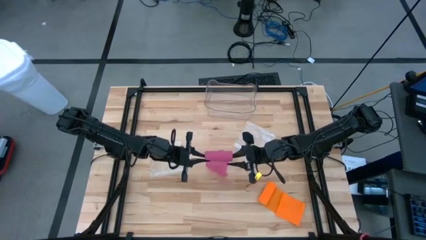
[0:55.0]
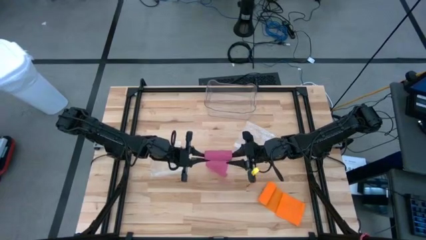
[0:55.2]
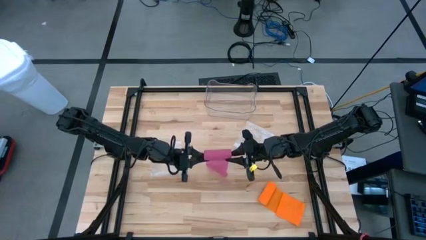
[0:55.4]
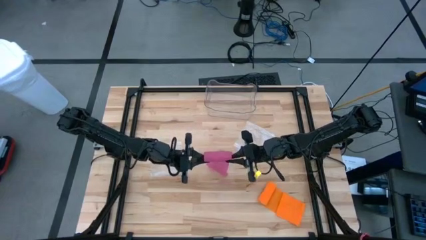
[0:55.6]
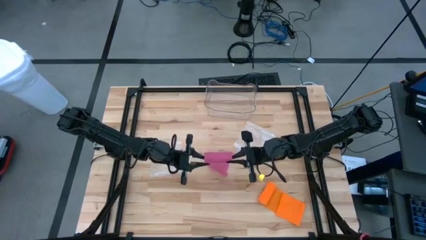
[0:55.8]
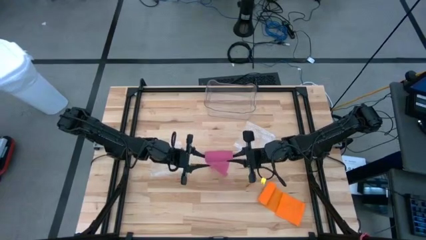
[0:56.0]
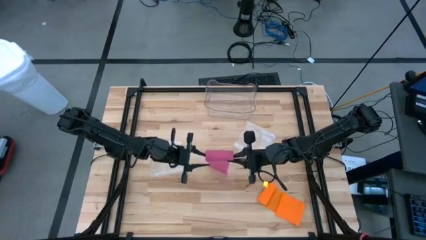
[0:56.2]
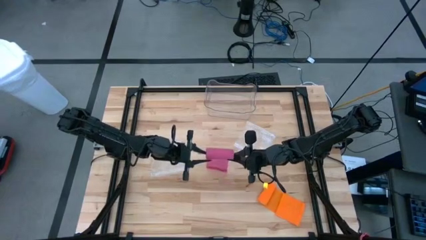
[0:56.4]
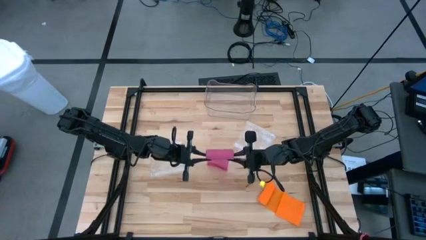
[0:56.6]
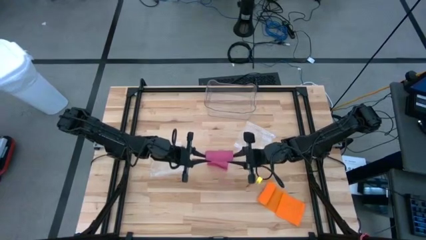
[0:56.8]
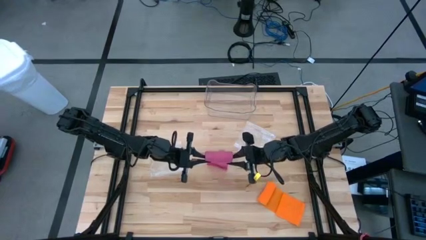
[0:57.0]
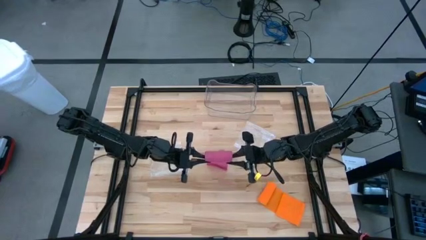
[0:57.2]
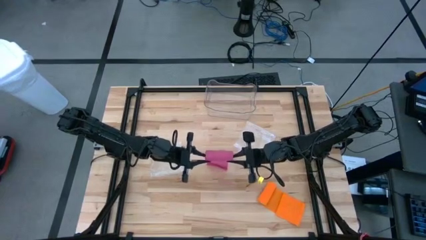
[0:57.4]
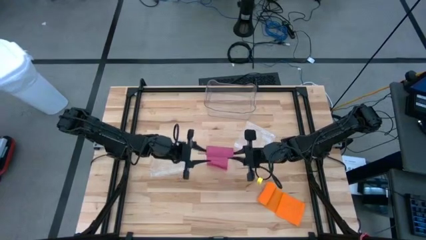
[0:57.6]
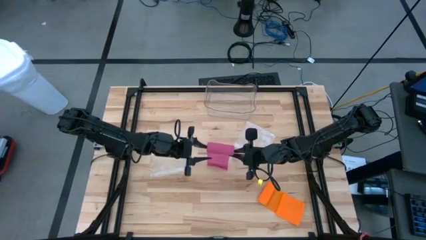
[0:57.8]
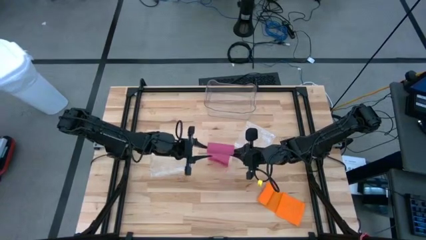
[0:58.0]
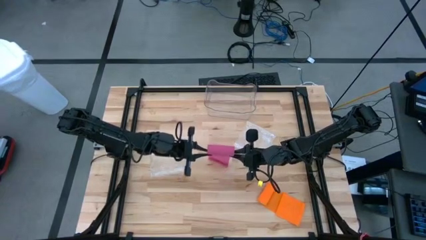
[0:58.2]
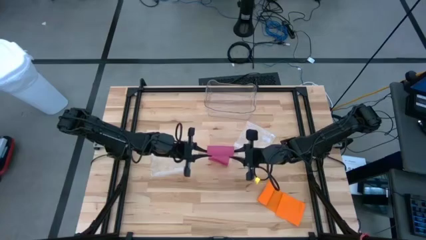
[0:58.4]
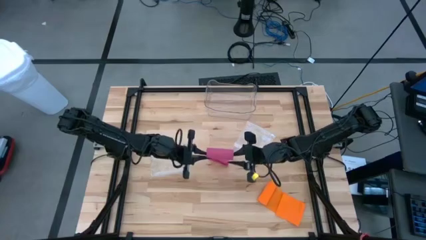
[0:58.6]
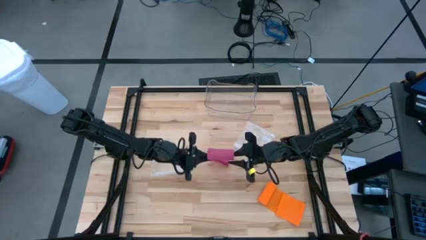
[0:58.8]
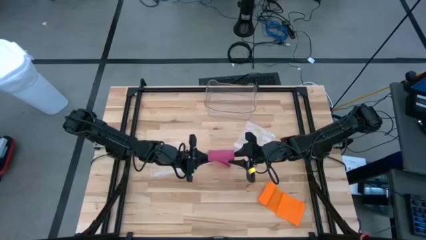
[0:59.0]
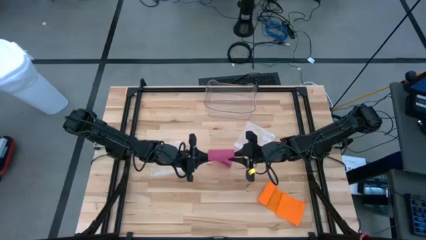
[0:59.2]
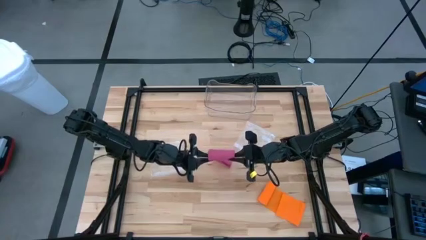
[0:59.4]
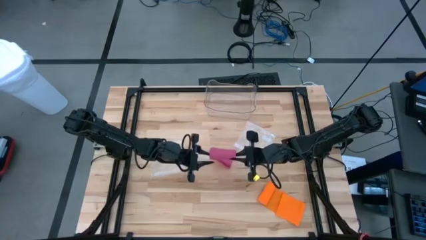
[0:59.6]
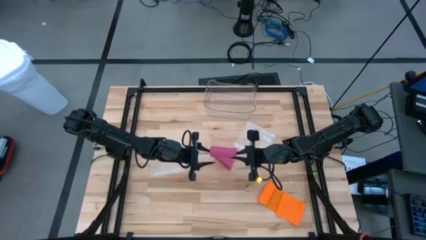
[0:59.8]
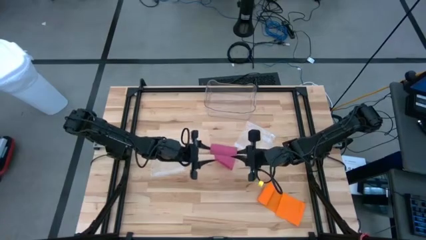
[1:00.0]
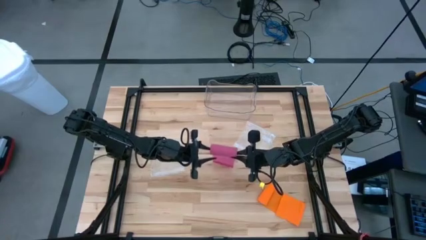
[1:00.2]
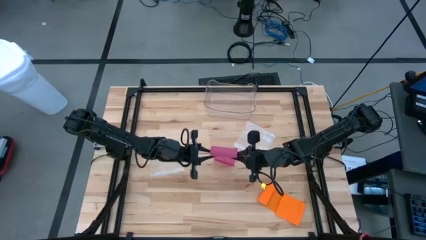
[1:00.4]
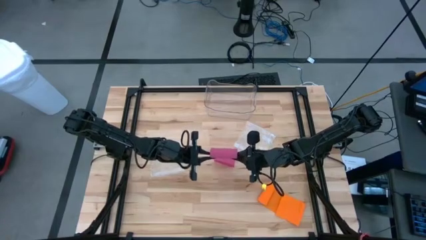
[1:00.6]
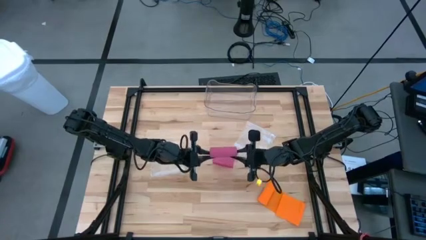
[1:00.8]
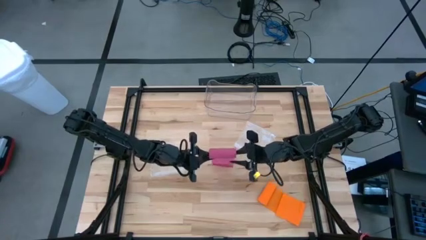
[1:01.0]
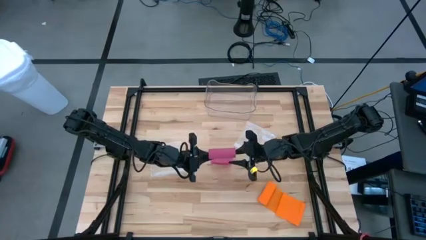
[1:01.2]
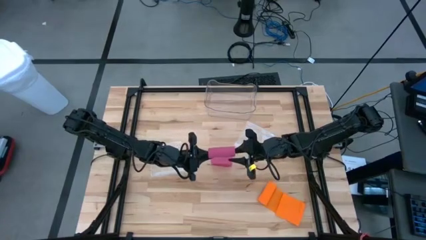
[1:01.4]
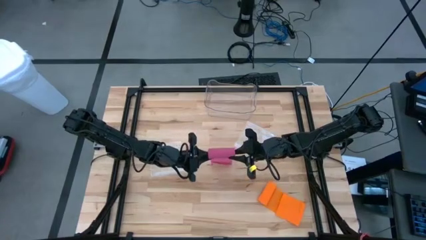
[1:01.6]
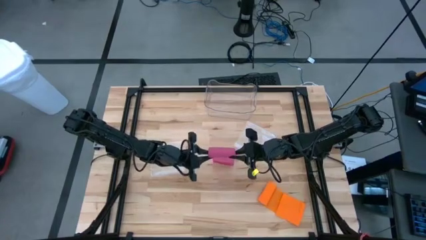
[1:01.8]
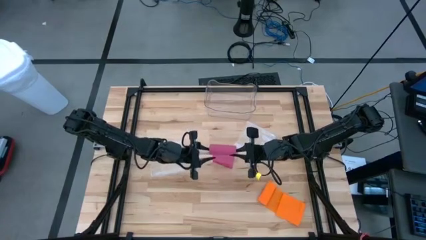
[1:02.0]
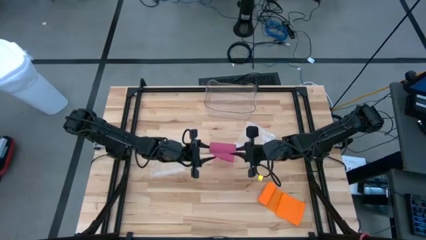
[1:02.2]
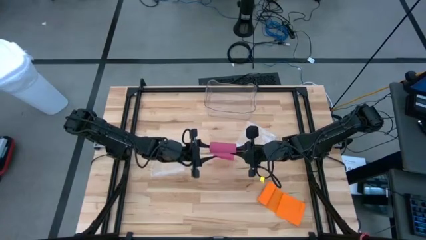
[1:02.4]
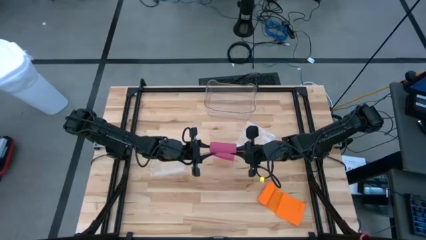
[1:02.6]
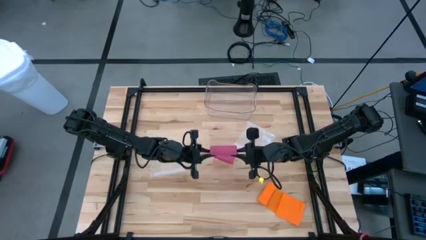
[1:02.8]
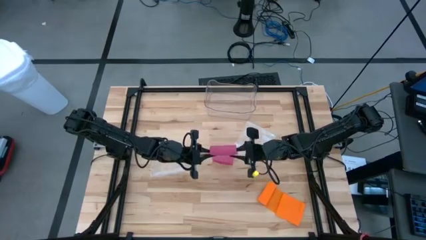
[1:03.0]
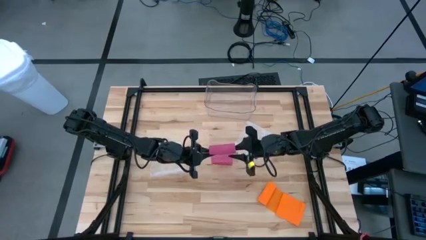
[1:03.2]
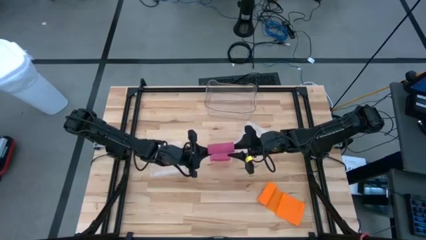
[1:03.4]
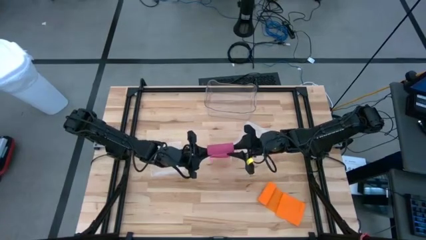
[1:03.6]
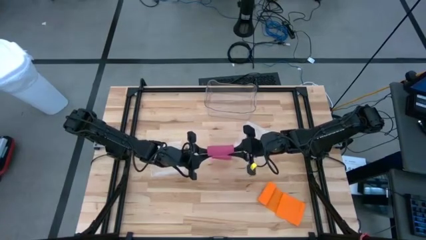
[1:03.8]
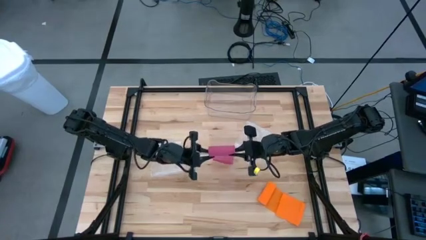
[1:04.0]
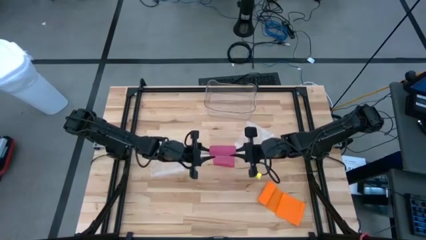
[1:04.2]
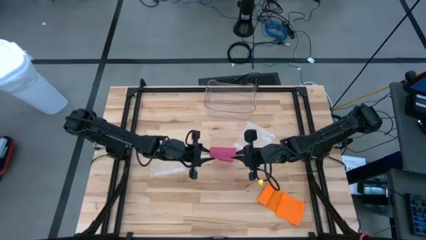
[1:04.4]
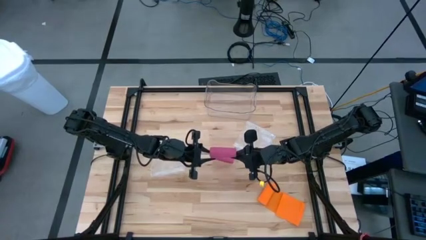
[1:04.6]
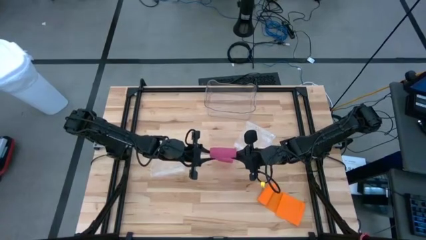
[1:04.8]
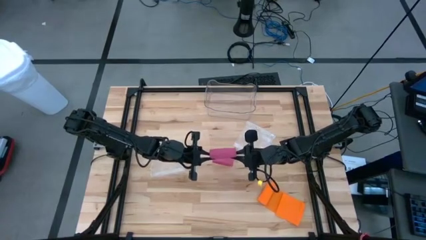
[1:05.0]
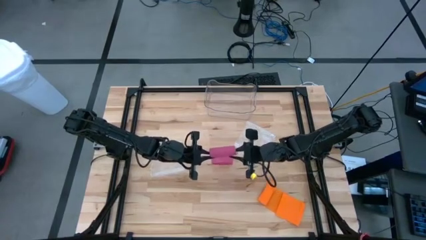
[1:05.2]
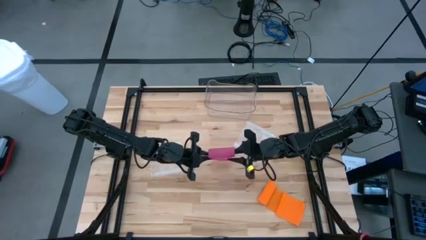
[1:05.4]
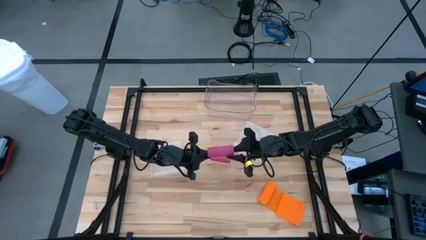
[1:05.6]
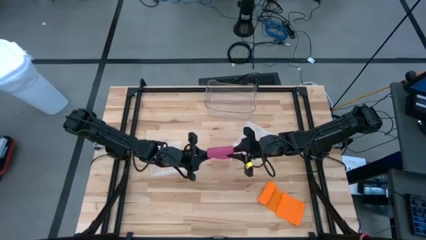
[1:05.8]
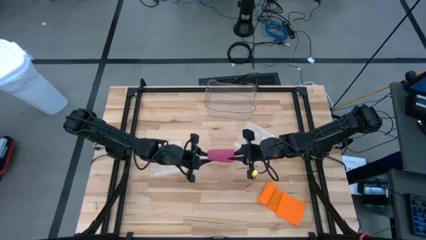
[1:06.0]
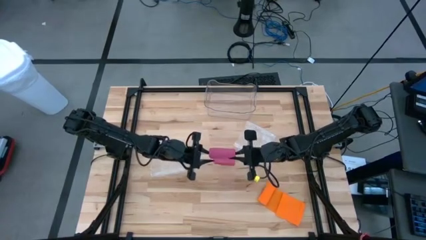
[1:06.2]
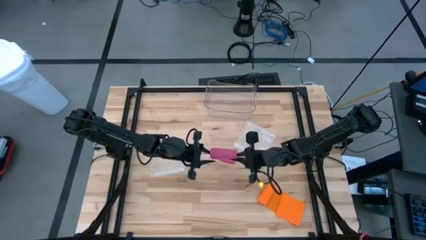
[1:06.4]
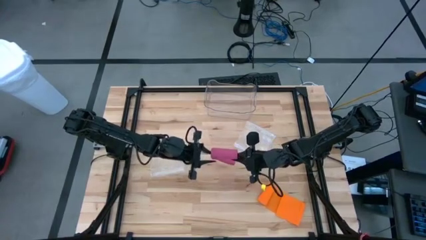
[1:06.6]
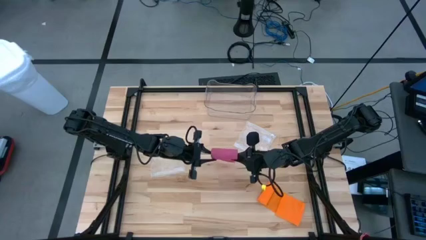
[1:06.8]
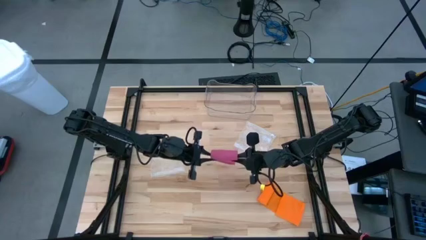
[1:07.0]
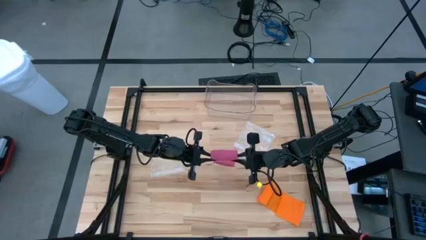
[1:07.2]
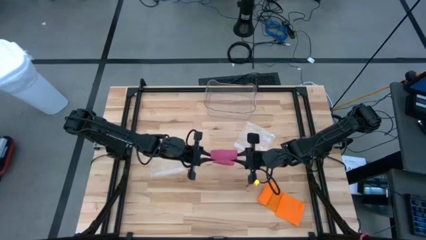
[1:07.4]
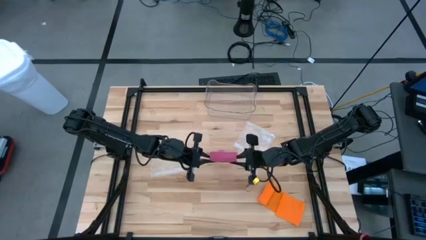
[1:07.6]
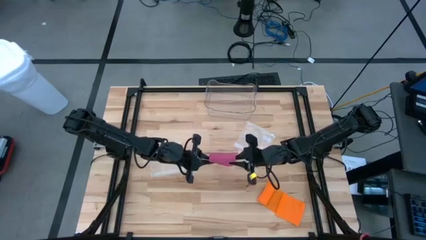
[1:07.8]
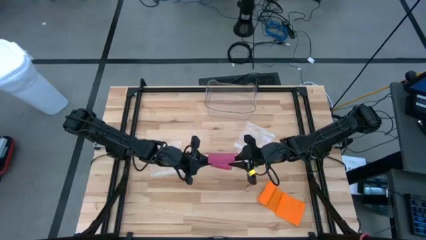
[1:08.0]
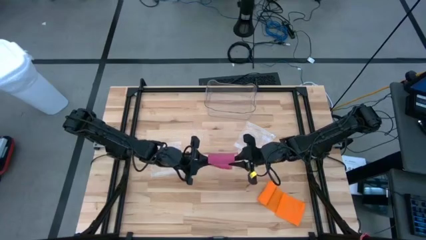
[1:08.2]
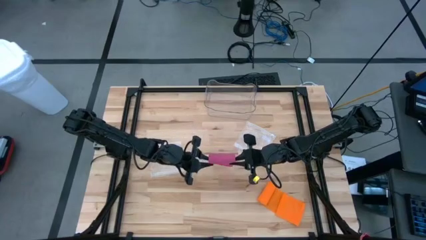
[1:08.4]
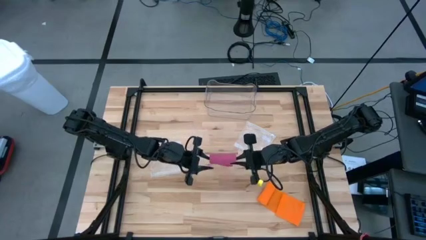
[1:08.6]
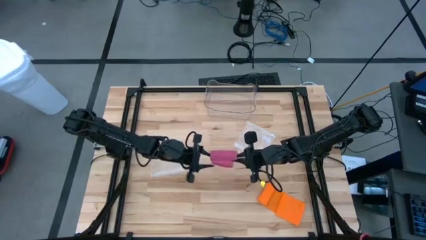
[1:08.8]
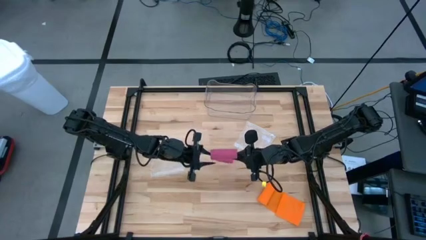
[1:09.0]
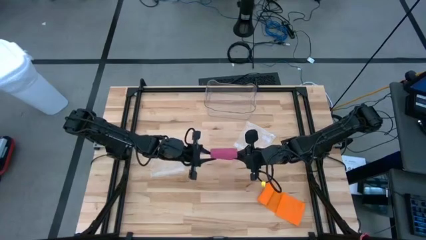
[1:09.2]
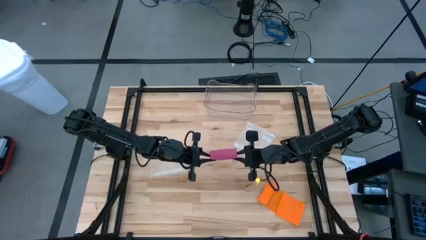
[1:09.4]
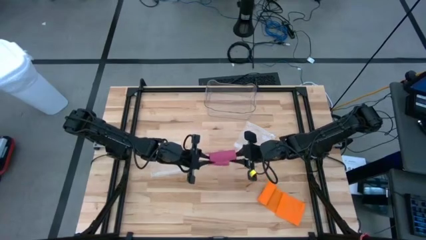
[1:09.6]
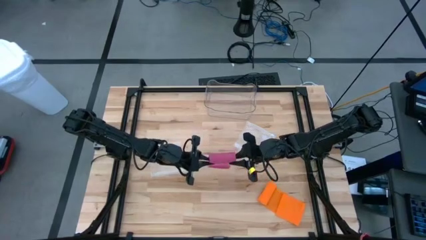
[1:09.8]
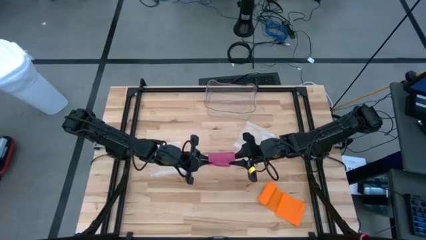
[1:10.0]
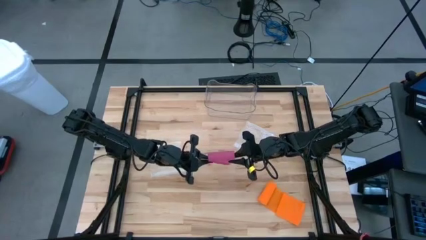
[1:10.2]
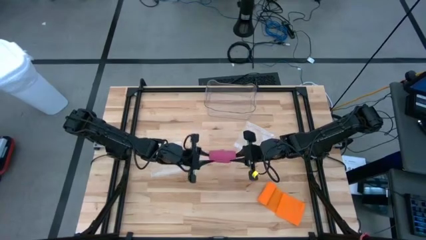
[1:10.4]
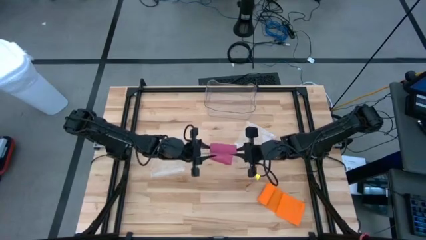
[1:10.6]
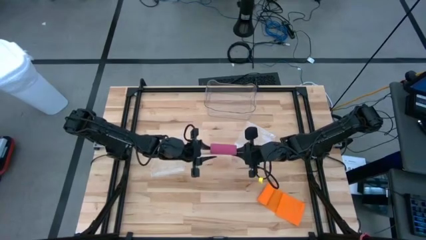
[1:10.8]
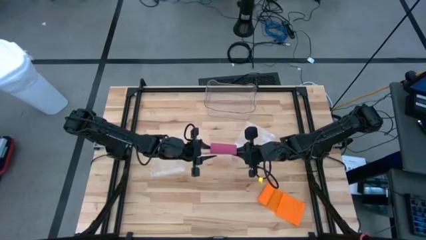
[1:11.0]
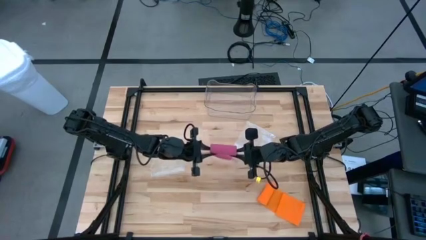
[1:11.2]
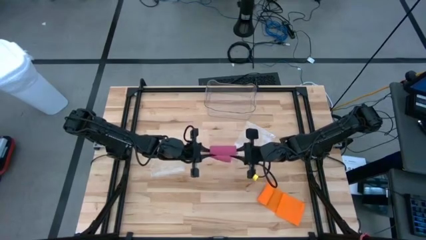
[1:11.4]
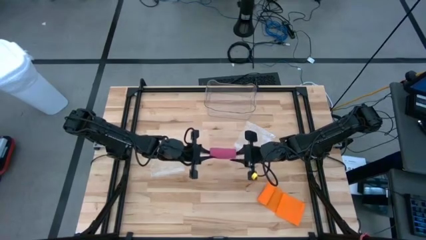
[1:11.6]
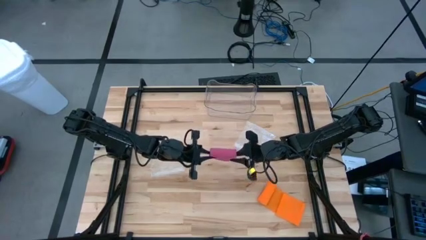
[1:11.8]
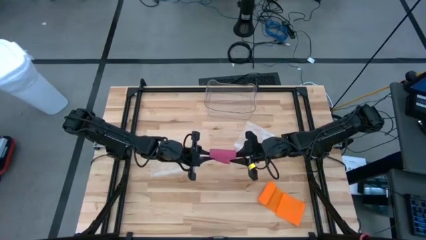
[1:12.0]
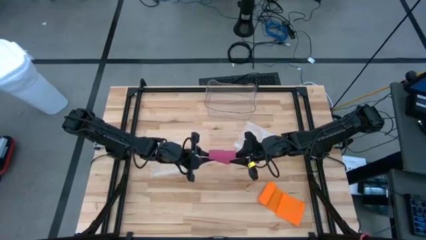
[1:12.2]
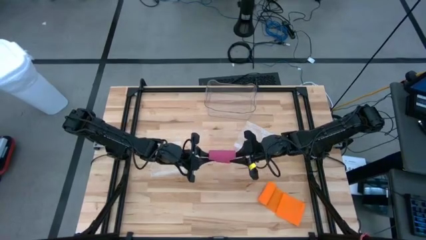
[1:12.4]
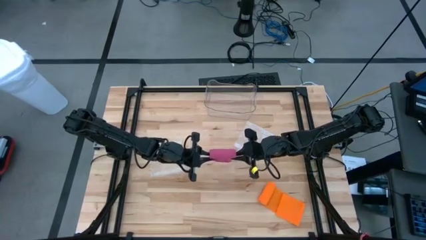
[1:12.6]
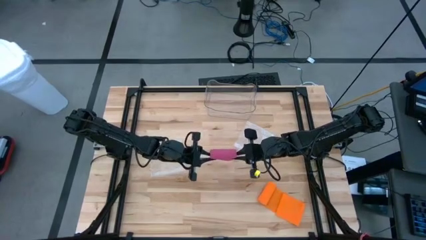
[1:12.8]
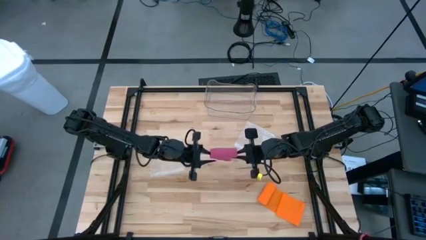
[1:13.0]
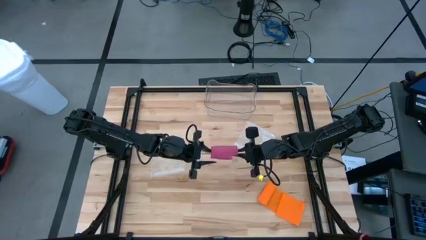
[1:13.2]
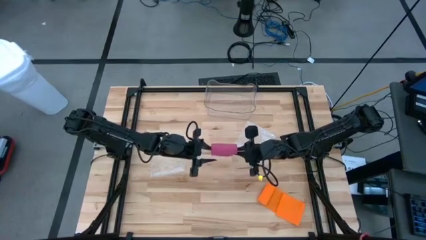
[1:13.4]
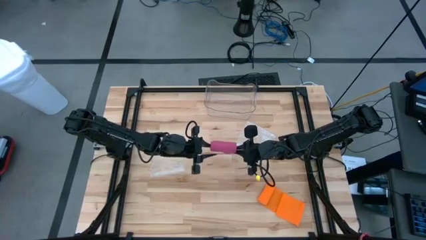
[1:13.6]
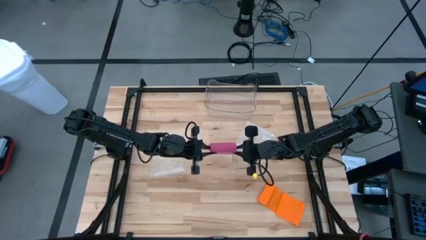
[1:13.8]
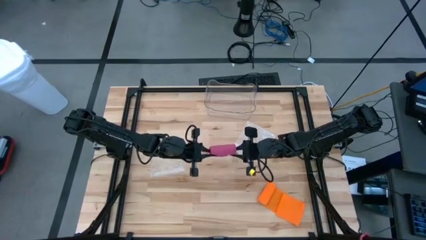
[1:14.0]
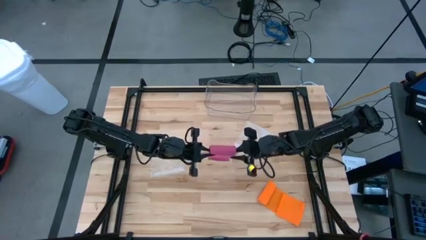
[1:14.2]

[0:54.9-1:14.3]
Task: Roll bandage
Roll the pink bandage
